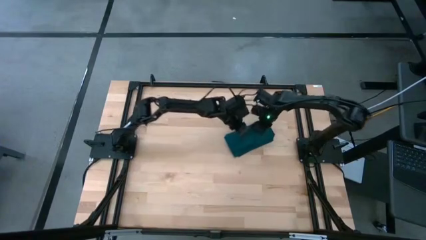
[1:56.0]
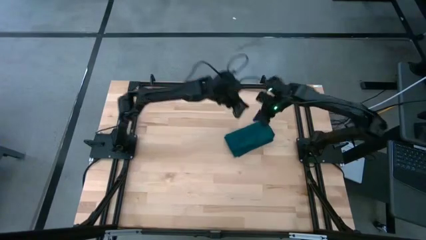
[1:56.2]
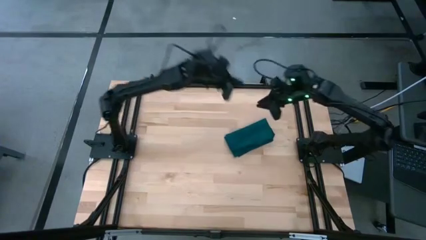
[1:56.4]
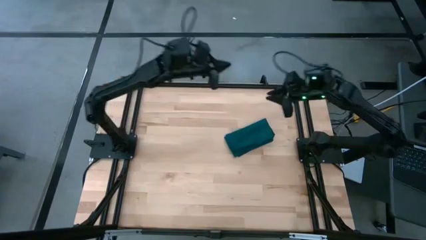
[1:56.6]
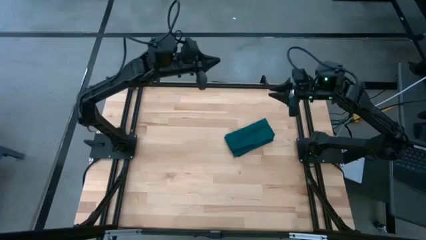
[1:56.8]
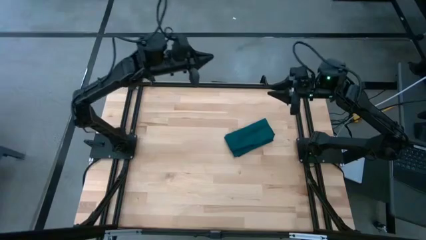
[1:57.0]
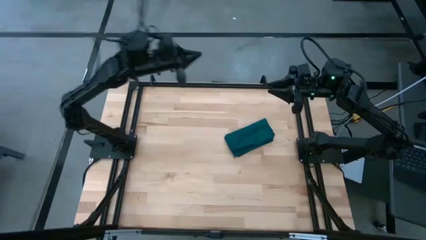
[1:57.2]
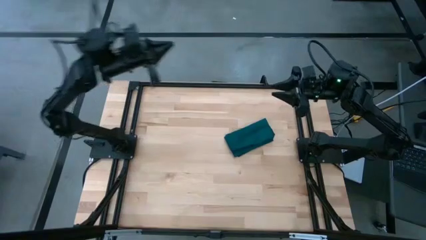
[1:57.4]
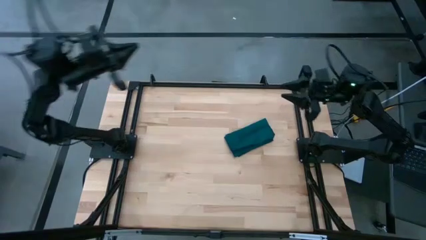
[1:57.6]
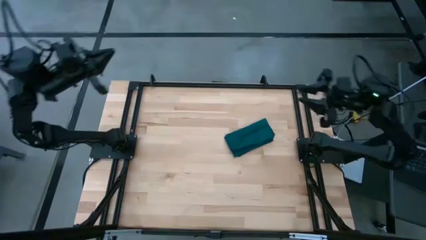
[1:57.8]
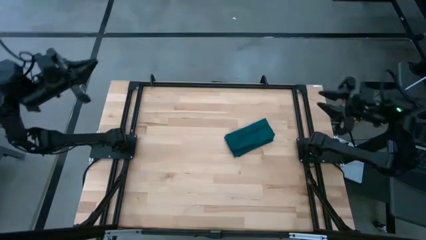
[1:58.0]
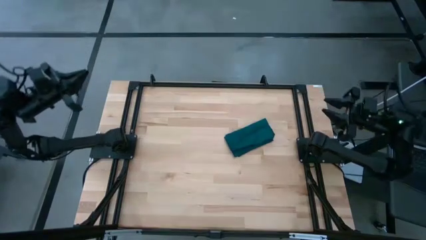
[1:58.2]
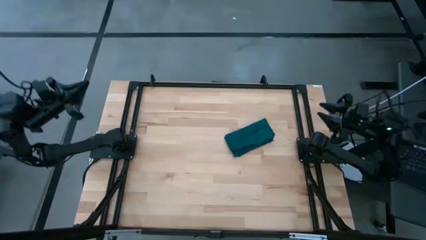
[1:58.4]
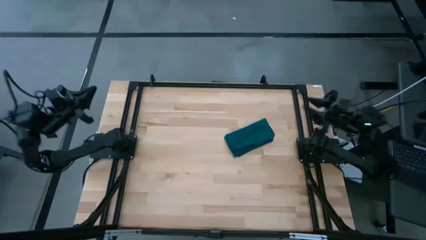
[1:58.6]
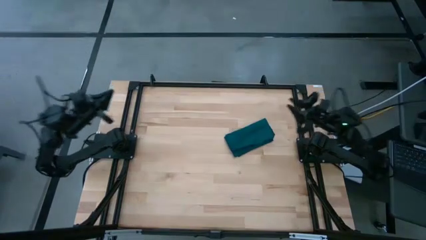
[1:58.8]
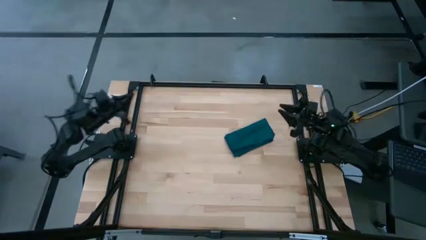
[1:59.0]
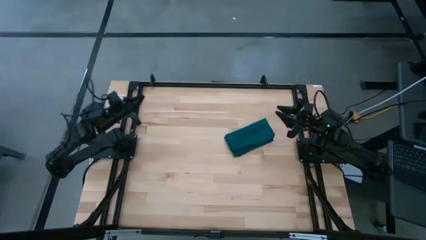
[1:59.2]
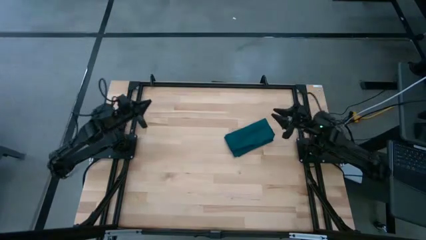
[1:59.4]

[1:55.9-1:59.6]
Task: Fold microfiber towels
Return to Home Position

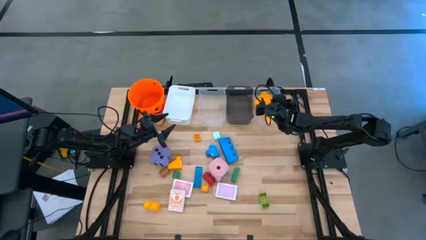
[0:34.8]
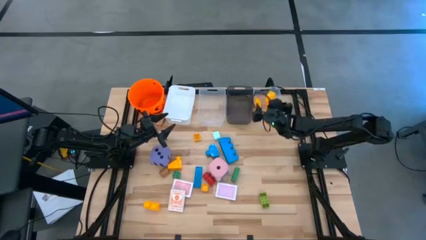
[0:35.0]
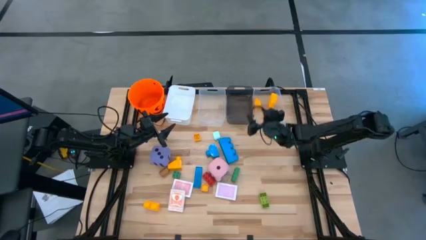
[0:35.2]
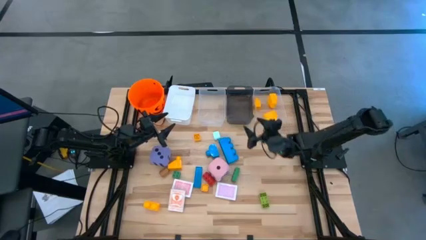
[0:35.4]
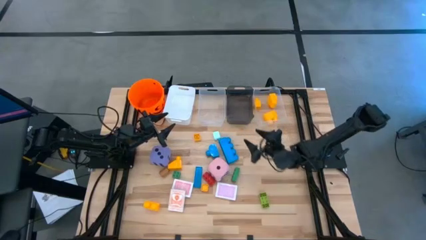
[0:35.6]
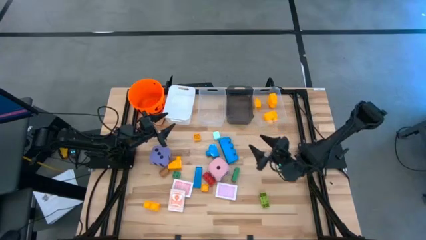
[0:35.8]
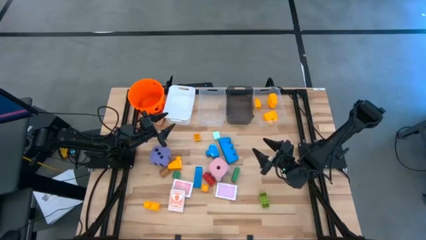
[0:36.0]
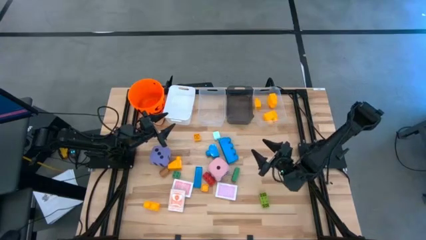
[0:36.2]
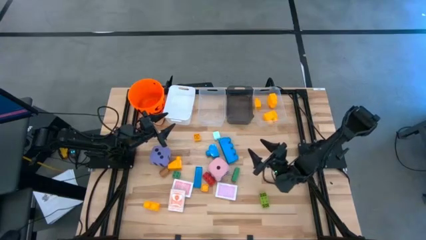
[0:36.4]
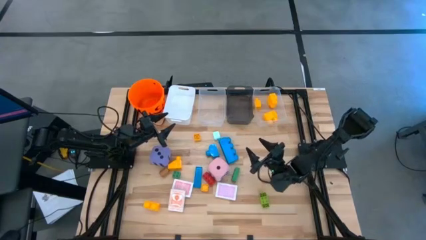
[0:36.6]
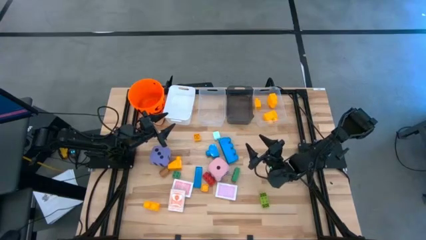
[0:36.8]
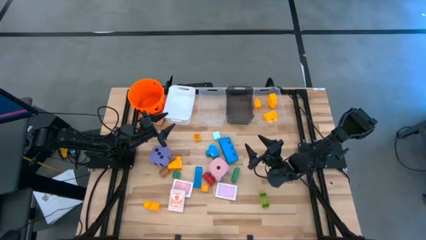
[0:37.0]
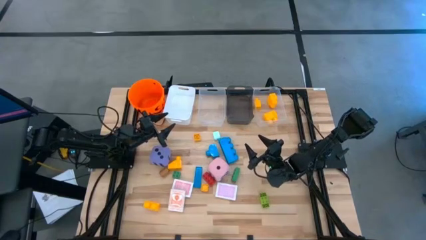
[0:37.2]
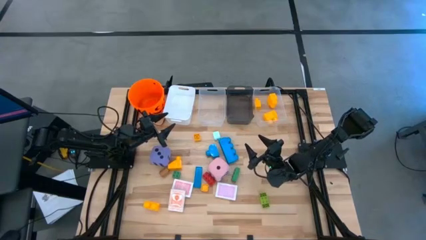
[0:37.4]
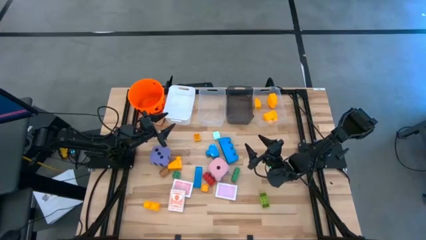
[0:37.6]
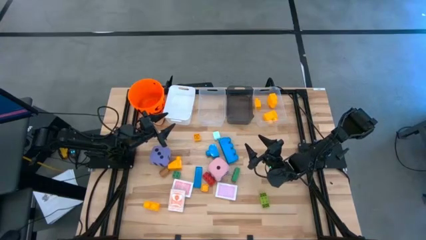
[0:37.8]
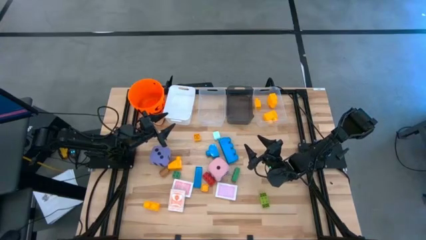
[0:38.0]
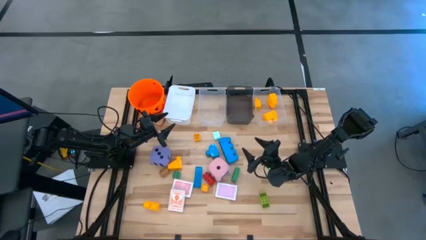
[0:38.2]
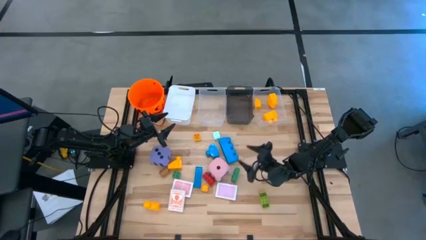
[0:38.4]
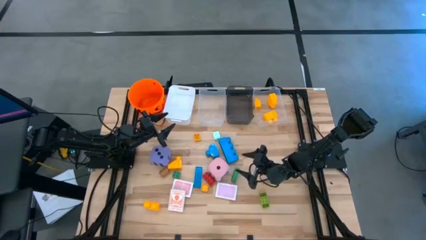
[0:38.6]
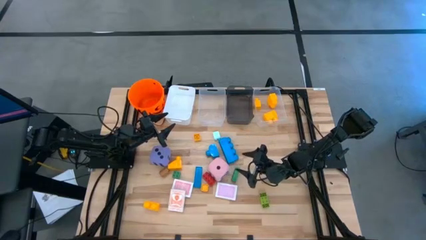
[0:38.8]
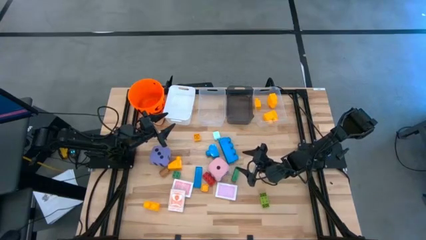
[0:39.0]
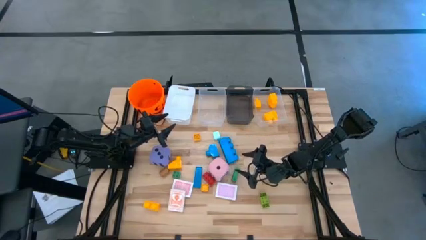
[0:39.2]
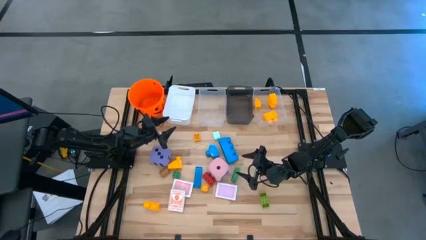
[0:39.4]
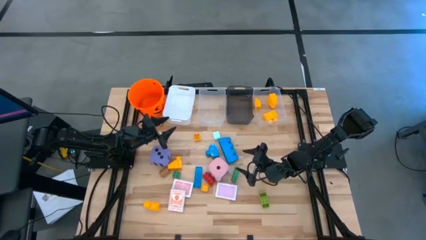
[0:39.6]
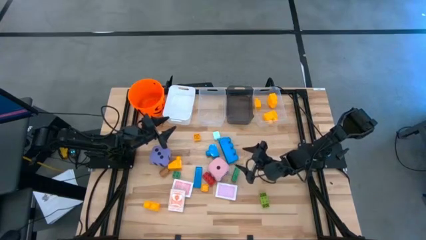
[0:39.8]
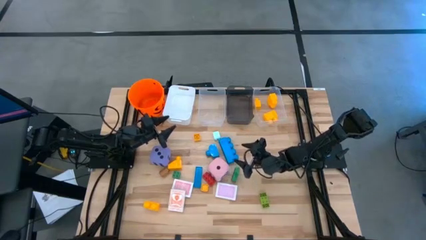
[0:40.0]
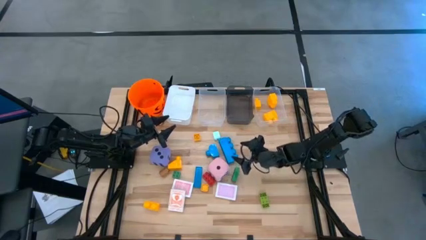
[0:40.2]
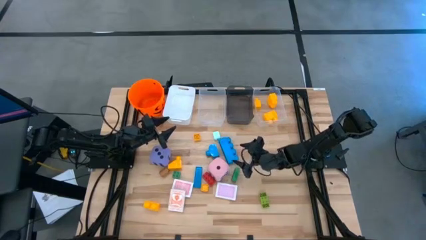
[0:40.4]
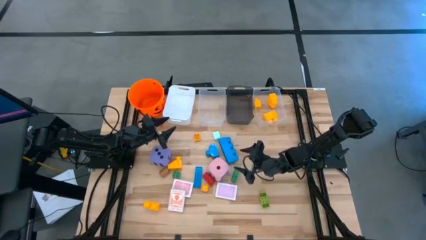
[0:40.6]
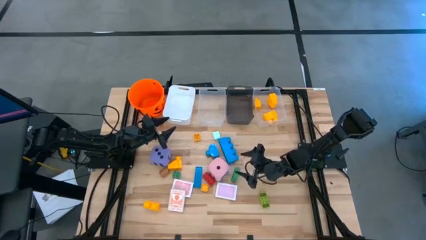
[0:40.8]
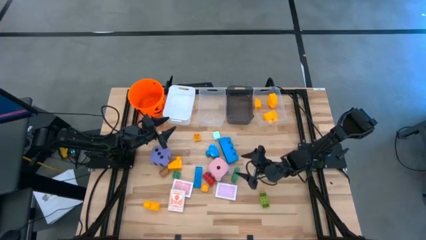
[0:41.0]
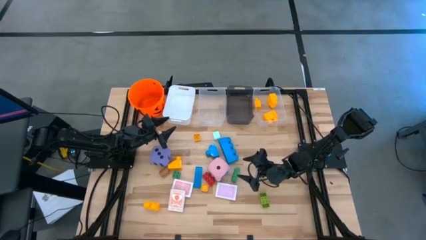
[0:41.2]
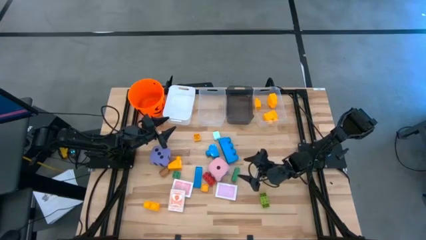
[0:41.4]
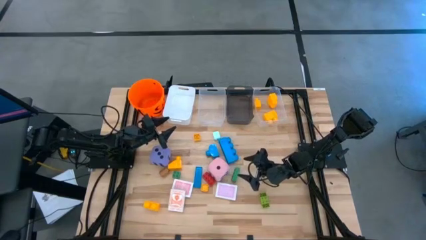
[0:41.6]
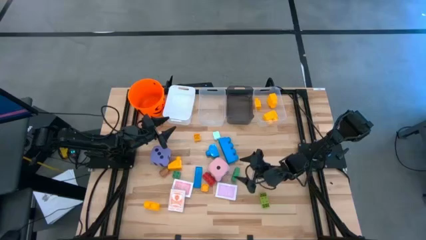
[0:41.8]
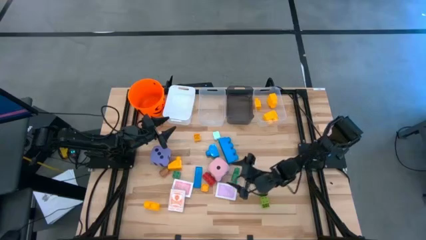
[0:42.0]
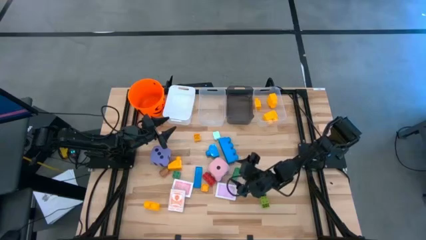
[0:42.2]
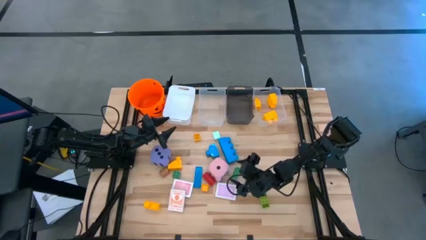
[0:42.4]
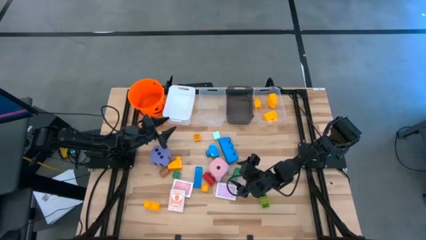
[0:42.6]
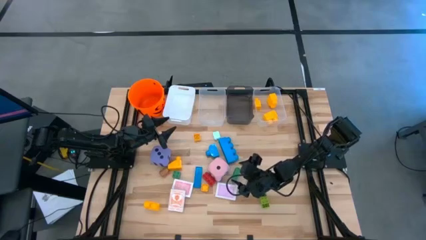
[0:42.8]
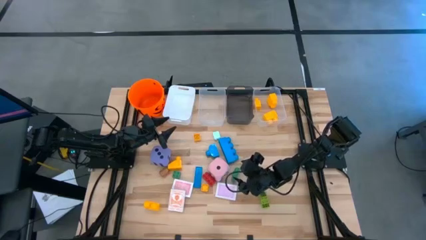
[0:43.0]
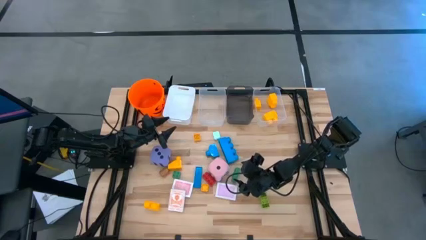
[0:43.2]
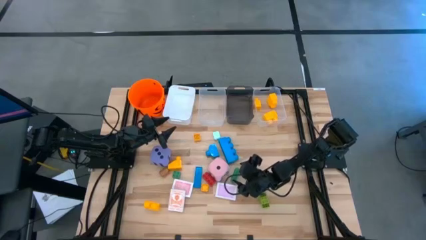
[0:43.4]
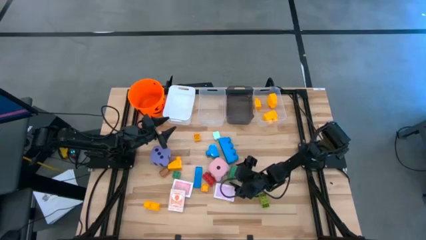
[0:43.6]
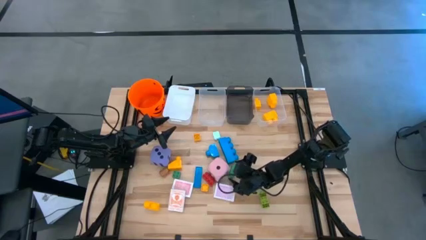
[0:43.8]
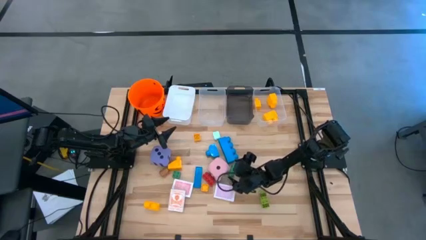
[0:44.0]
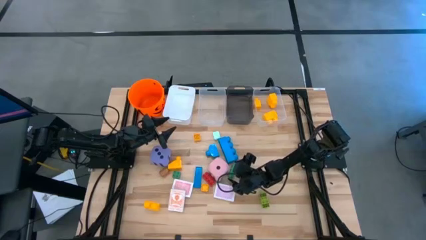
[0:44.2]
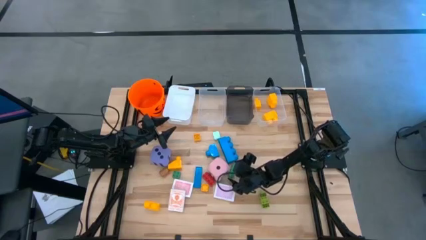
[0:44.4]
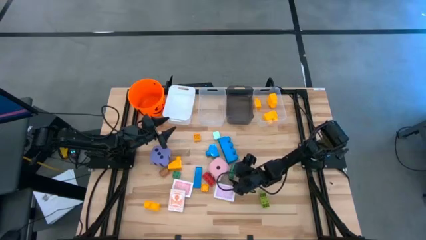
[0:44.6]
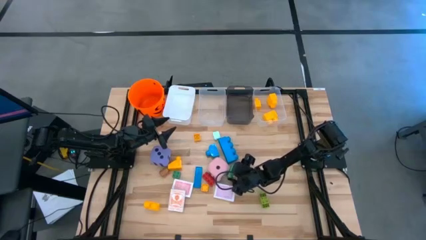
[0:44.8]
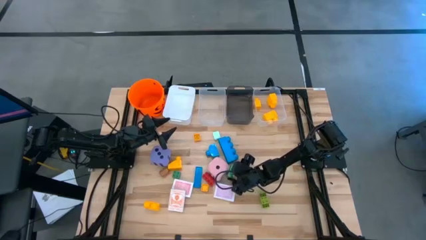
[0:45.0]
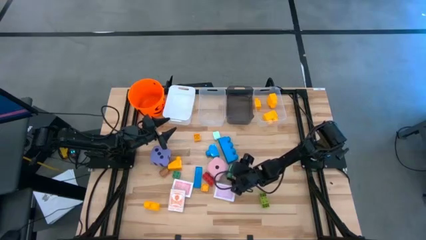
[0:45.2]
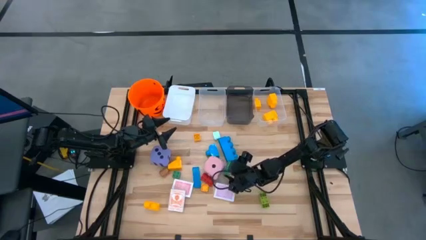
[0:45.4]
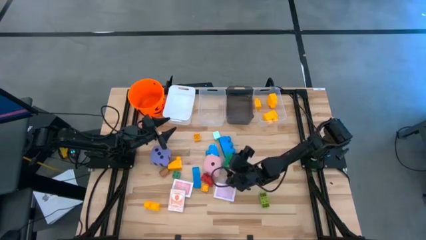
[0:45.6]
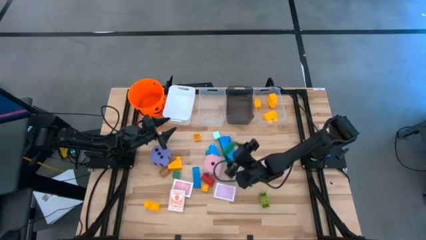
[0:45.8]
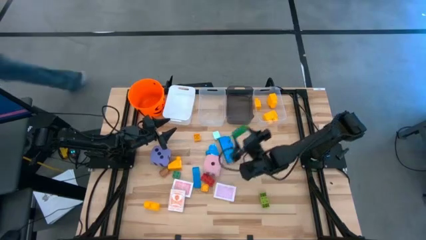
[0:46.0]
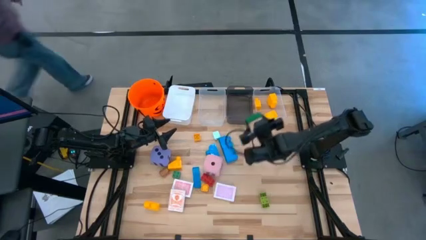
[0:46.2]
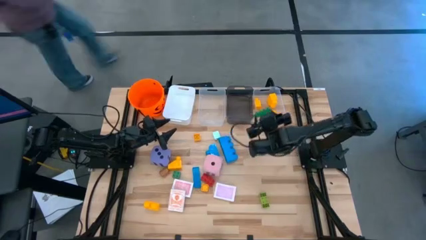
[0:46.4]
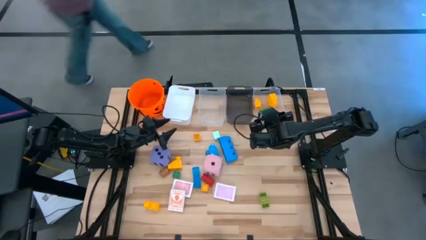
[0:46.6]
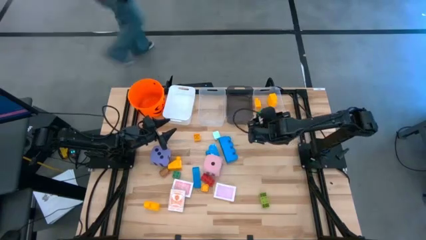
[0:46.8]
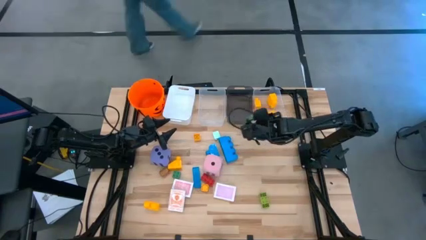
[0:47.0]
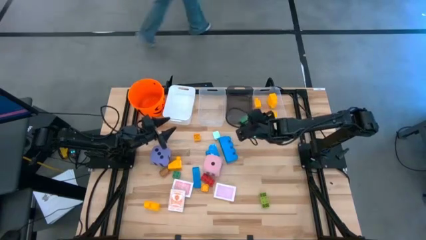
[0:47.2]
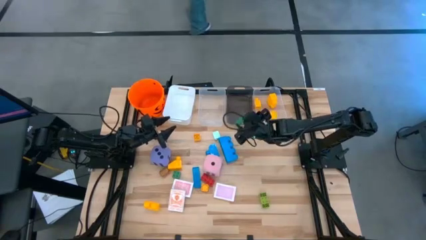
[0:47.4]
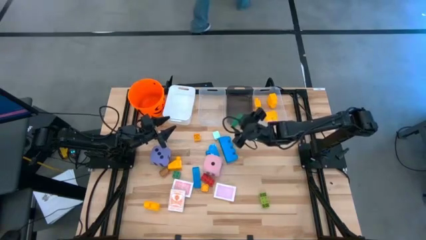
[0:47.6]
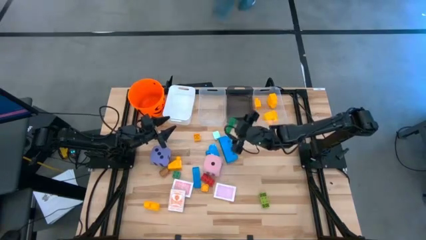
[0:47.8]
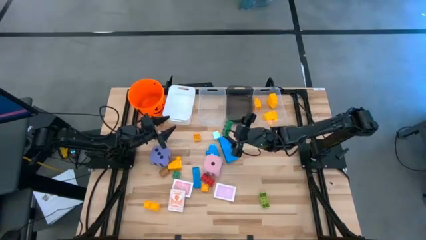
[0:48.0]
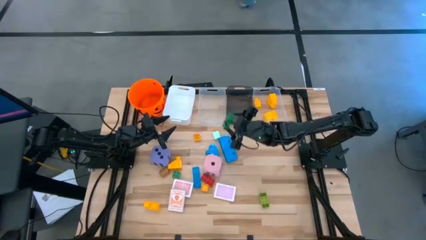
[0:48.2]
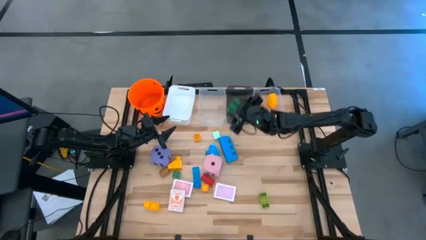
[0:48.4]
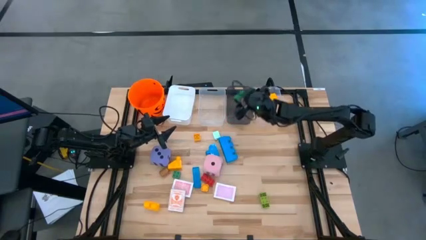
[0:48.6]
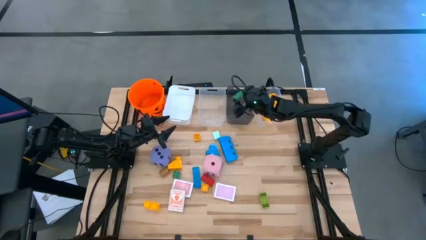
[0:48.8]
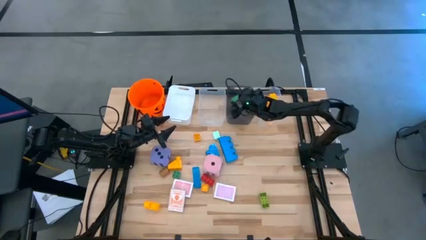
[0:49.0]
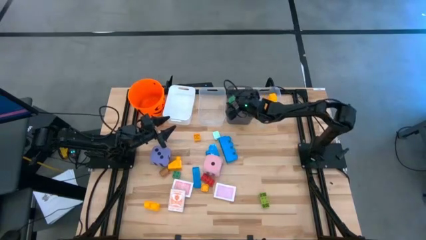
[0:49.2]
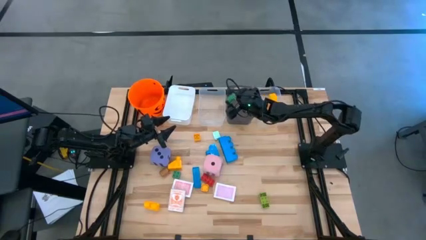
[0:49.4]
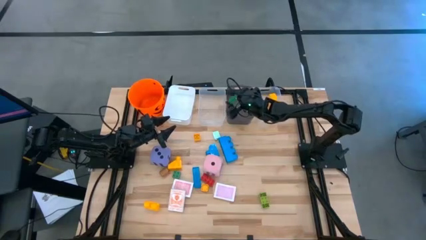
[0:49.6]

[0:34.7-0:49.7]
Task: Pick & Place Toys
Put the small green game piece into the black bin
